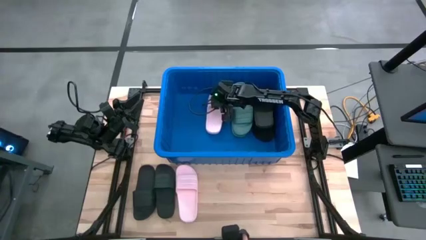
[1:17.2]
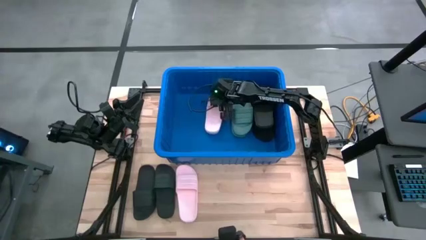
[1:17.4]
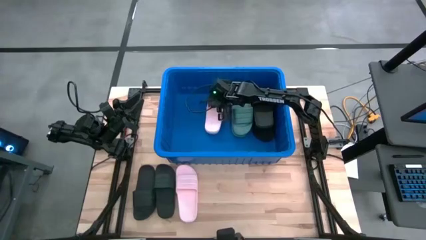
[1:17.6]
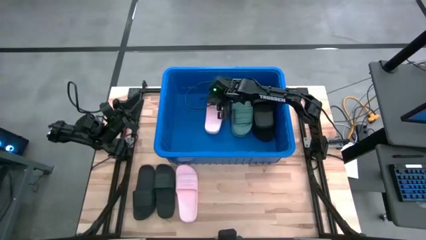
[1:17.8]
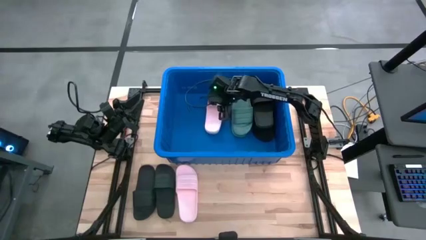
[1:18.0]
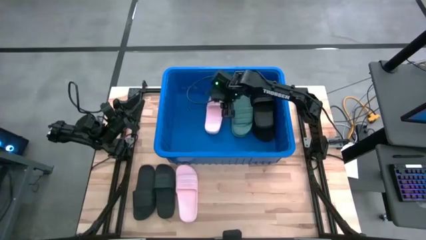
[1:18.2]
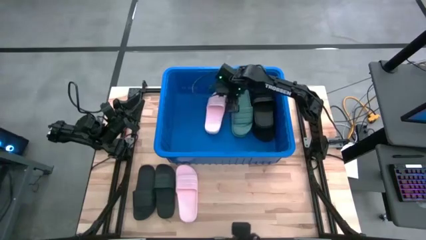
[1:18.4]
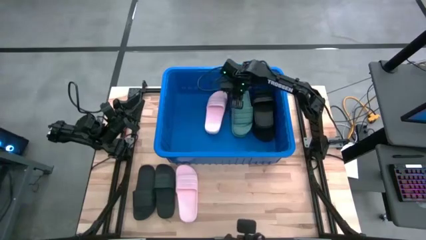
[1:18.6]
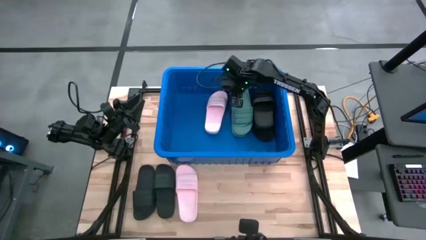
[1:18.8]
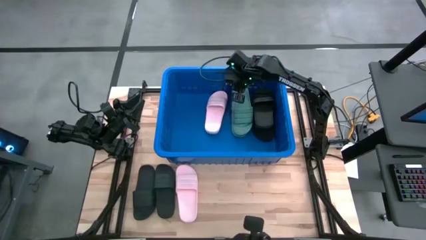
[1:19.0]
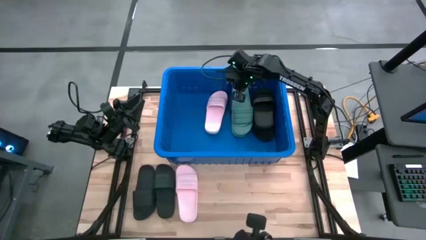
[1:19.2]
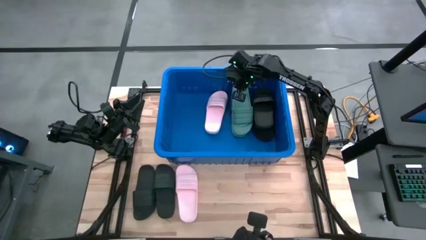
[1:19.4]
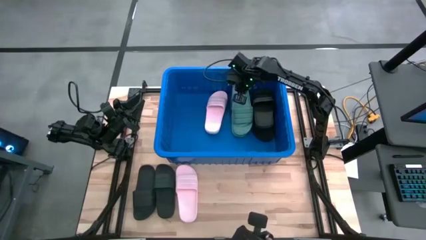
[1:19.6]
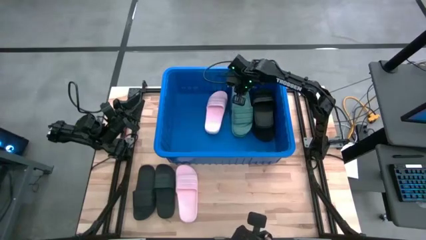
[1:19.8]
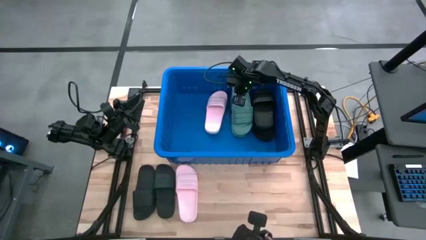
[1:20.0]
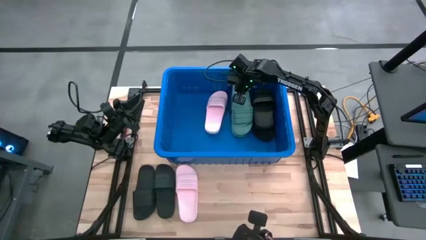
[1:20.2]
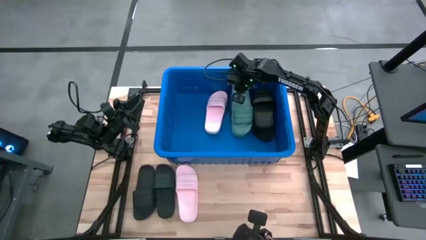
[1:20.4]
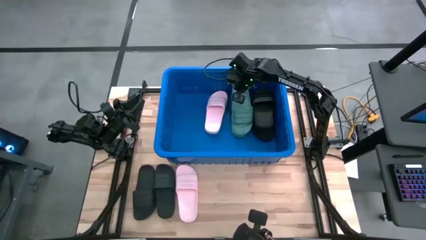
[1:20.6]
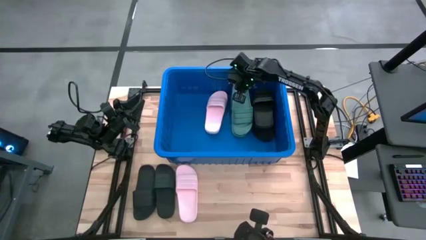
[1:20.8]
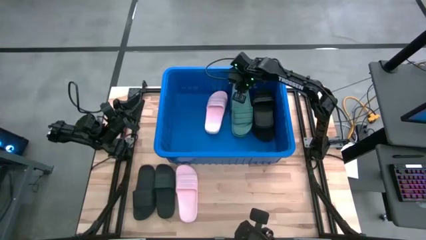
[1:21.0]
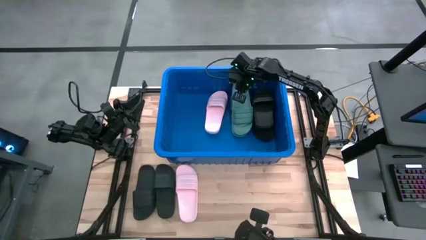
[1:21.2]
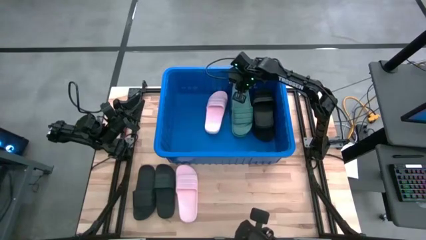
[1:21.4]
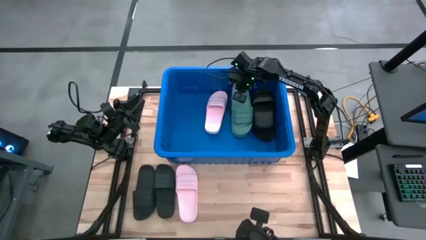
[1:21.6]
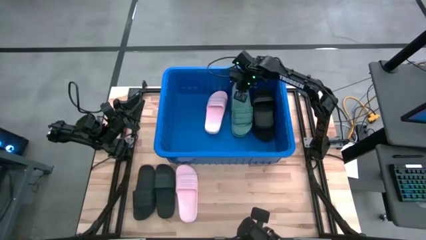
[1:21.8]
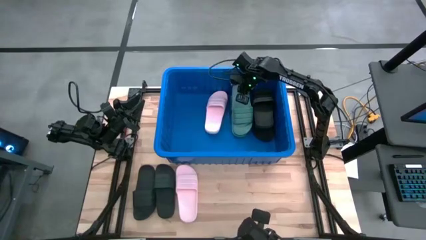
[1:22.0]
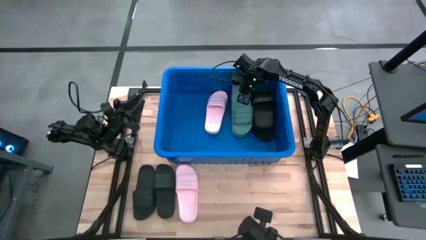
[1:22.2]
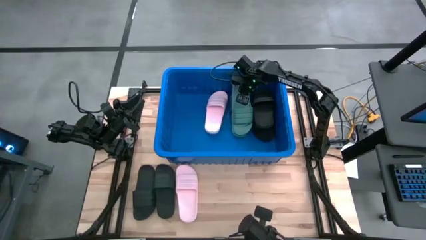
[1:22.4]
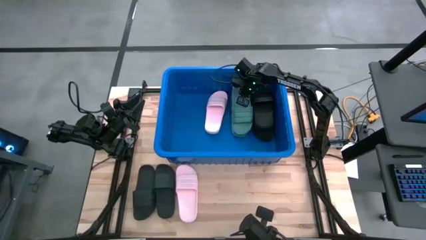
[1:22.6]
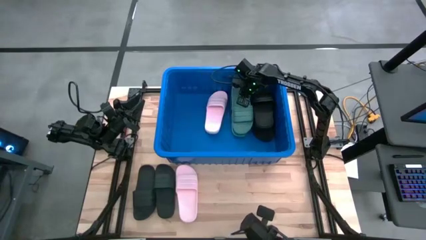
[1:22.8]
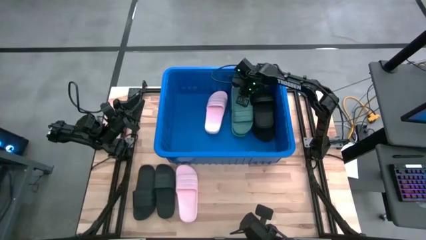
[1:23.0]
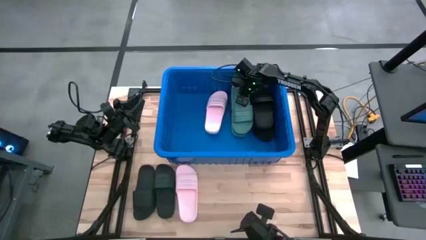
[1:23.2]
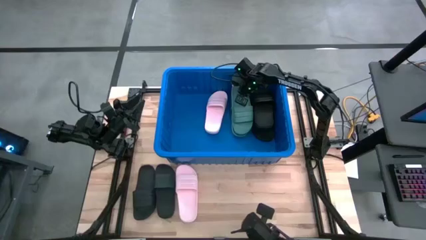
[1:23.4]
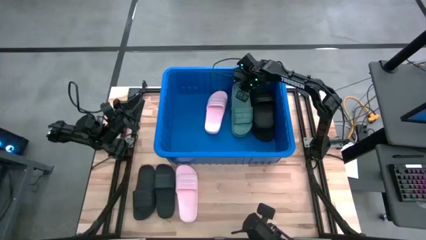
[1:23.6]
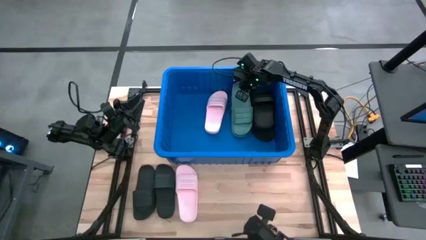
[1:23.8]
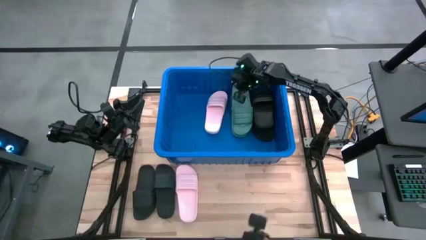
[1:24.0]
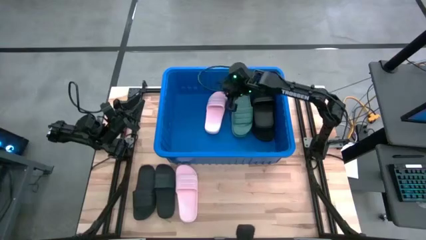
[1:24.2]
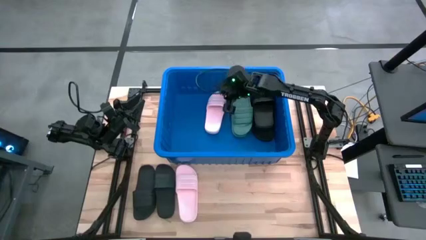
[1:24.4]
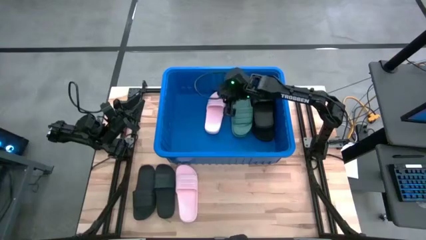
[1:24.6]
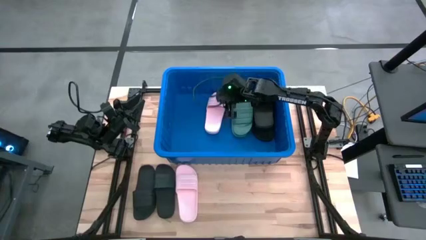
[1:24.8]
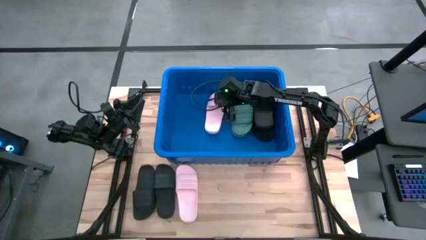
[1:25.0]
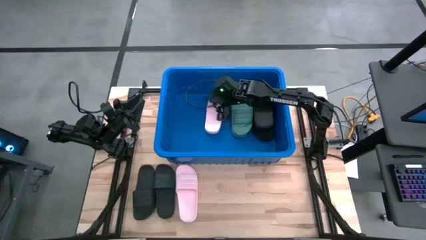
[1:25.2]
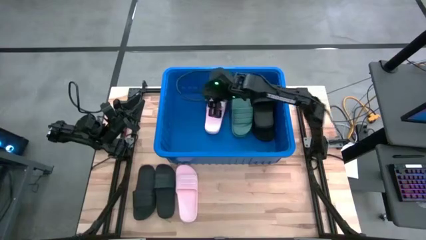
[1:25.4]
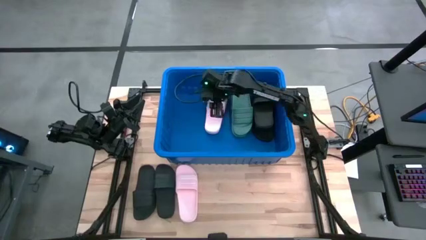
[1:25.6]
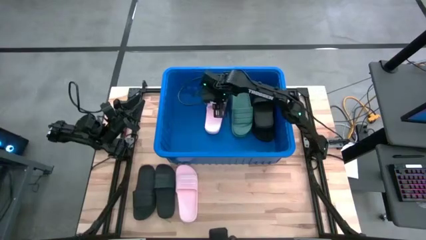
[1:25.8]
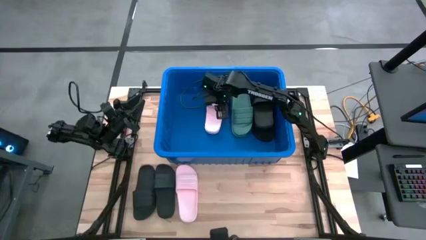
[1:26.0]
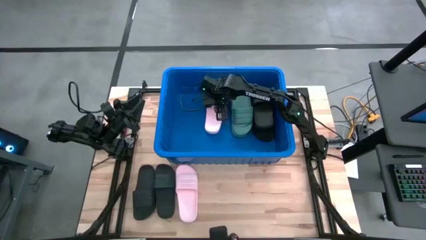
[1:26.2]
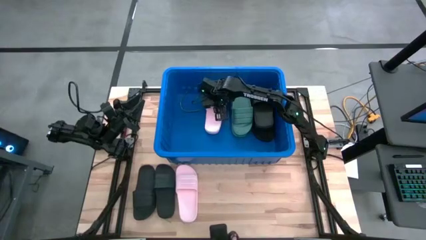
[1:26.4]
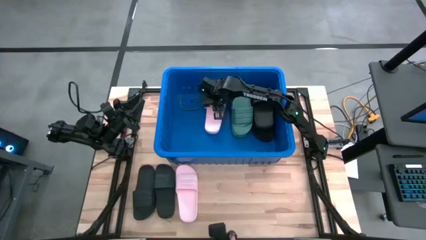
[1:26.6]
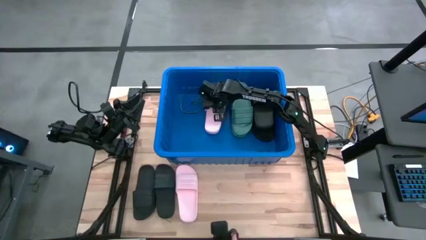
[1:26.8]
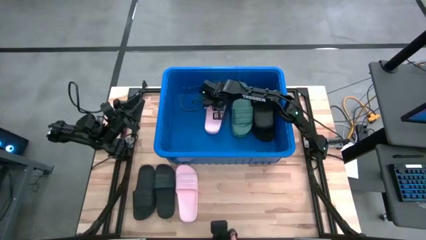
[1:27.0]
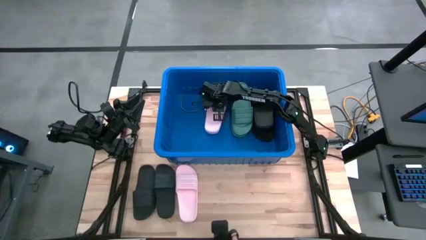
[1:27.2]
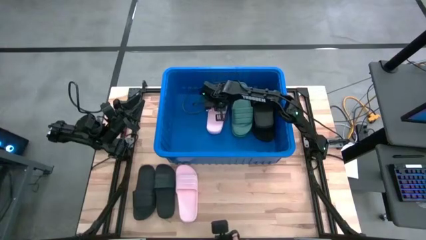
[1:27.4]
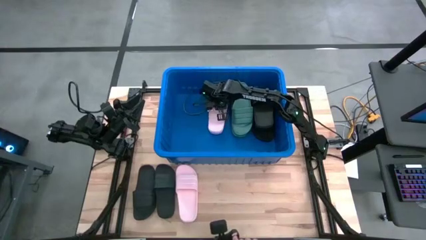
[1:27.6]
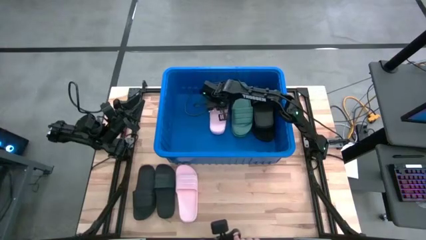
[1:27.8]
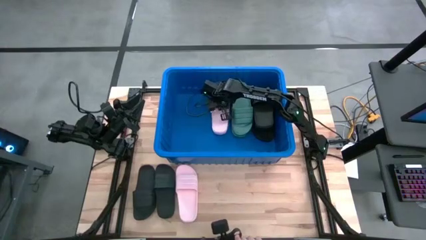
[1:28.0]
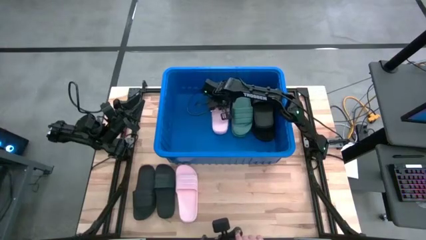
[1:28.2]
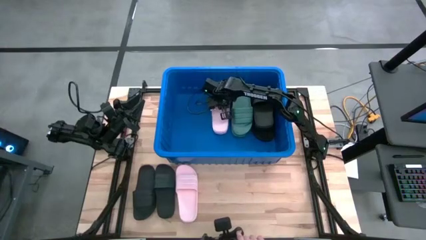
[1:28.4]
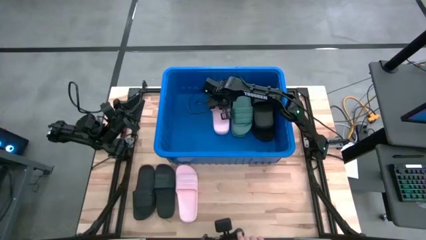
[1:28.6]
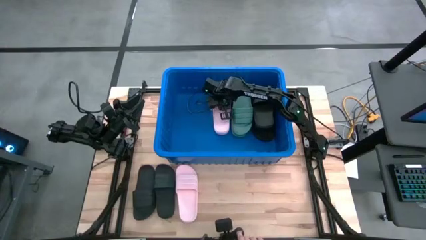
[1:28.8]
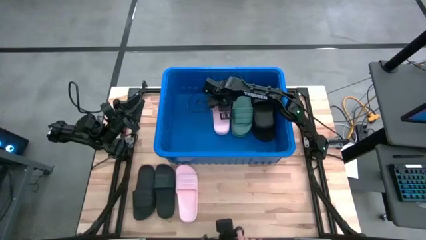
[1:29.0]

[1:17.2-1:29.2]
Task: Pick and place slides into bin
Adjust the slides into the bin
